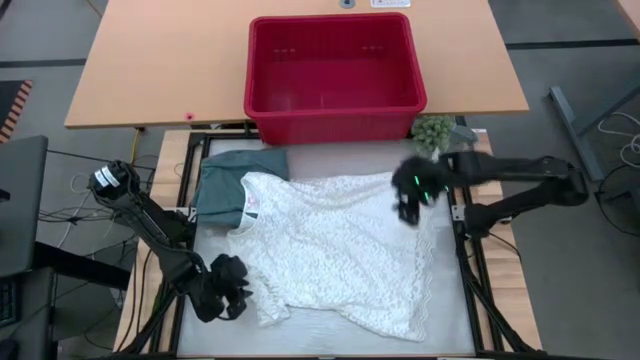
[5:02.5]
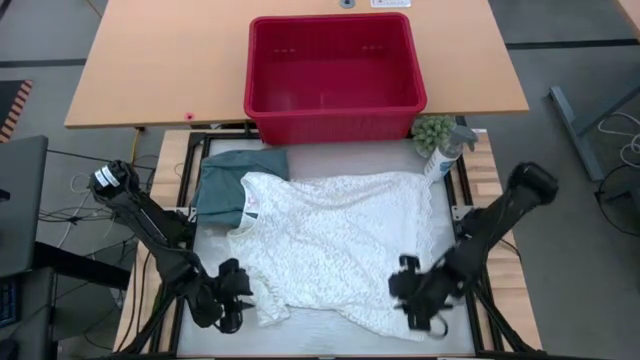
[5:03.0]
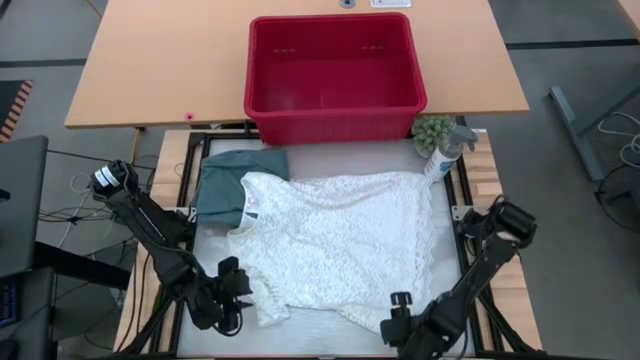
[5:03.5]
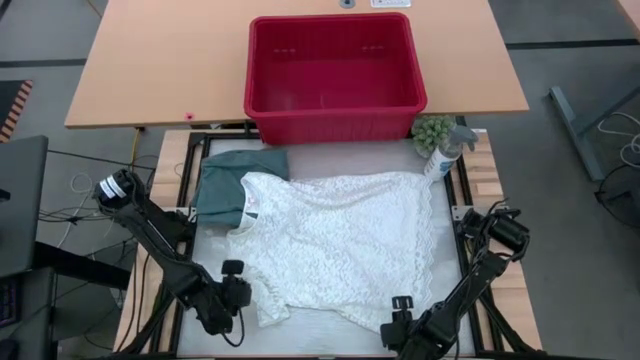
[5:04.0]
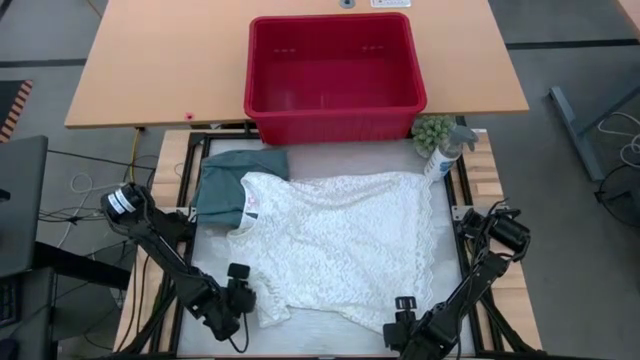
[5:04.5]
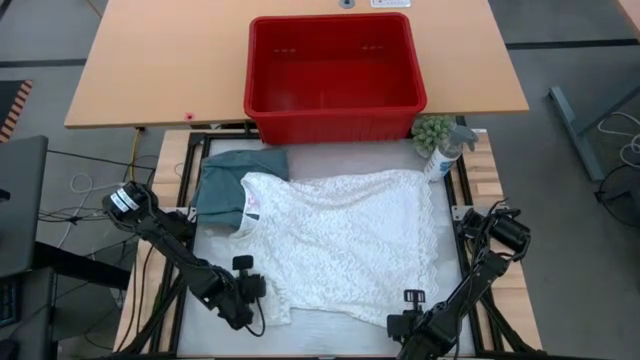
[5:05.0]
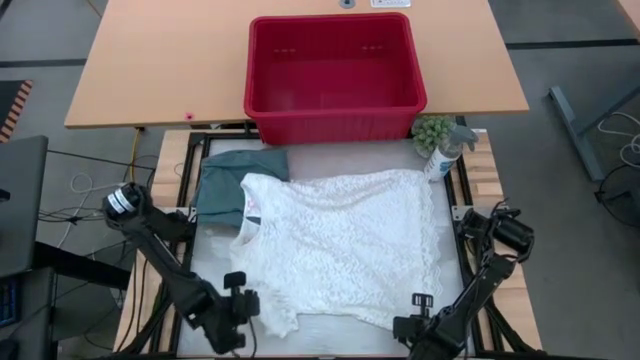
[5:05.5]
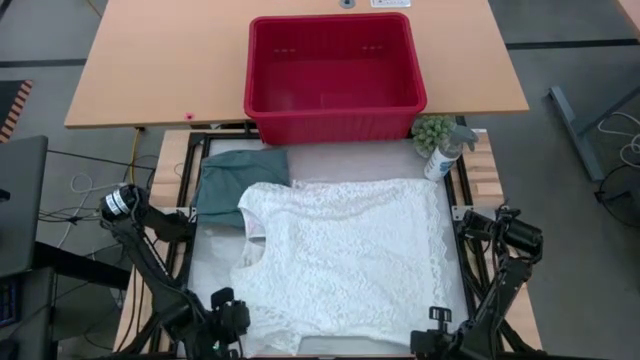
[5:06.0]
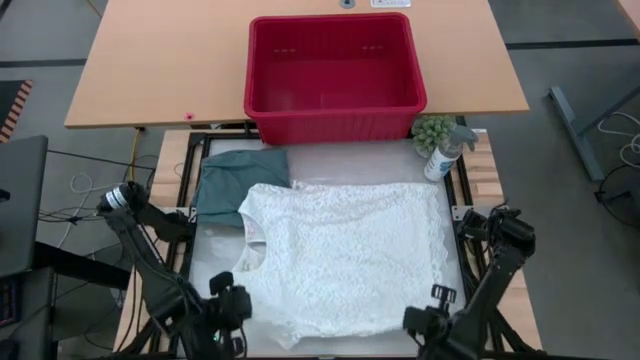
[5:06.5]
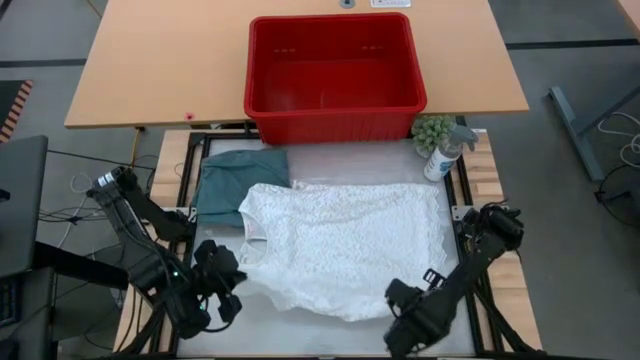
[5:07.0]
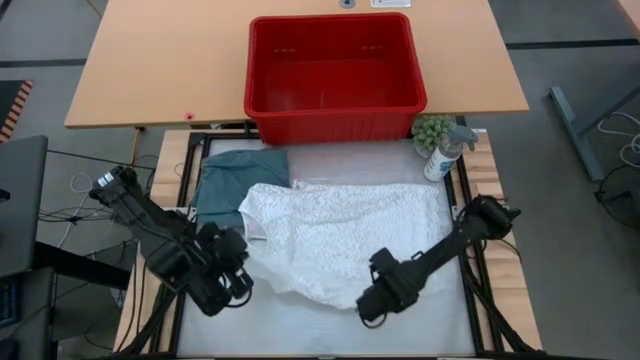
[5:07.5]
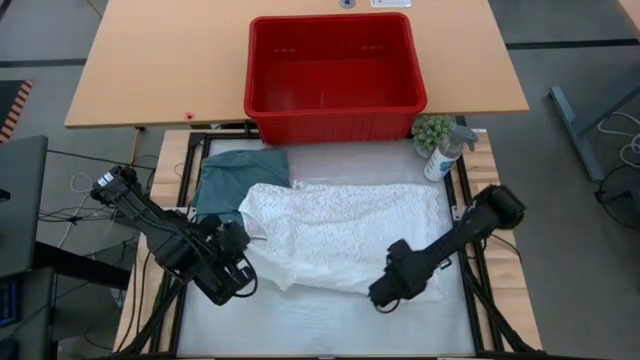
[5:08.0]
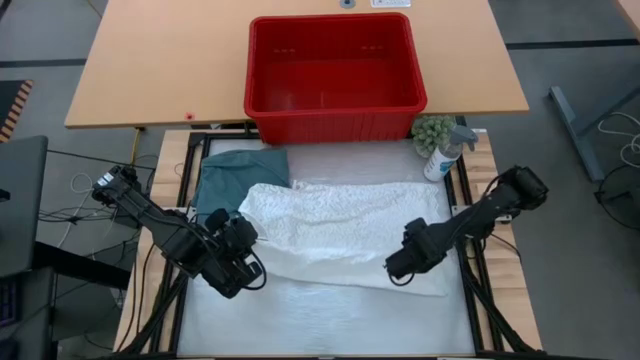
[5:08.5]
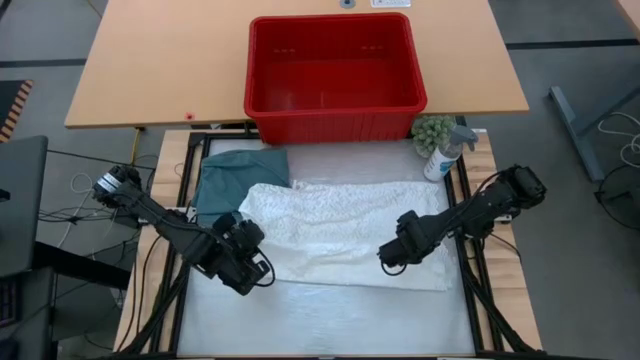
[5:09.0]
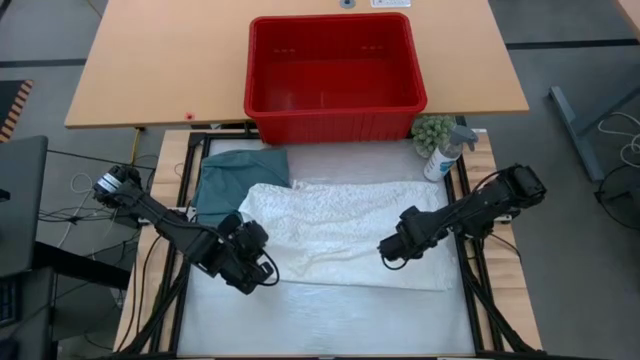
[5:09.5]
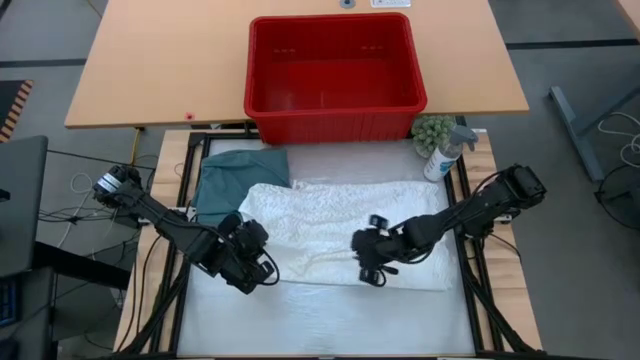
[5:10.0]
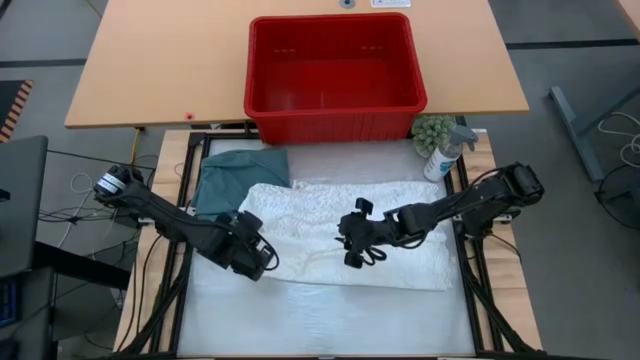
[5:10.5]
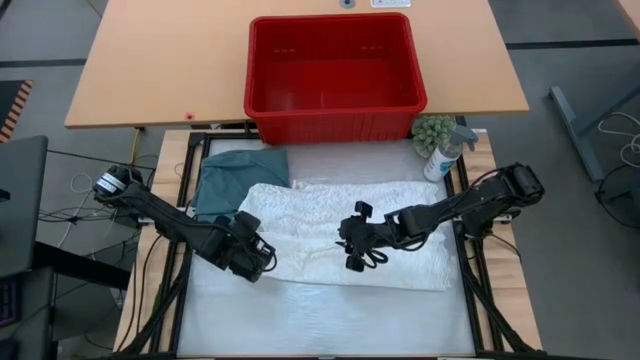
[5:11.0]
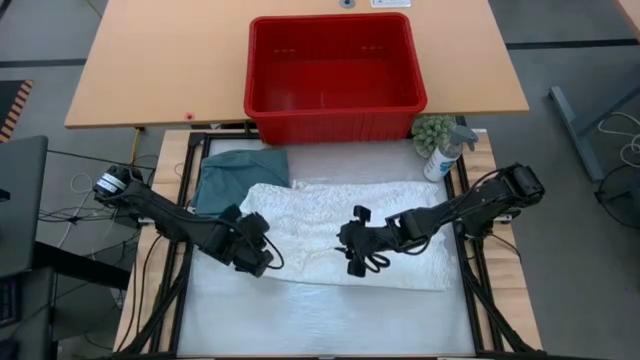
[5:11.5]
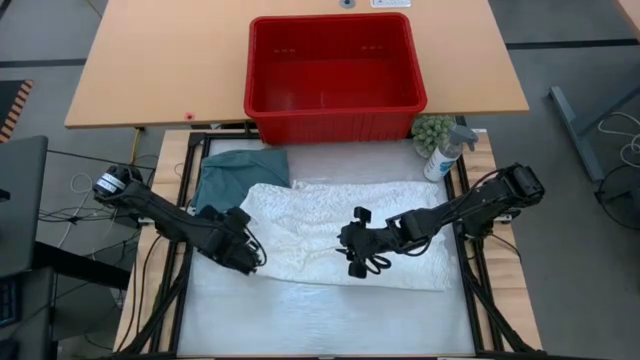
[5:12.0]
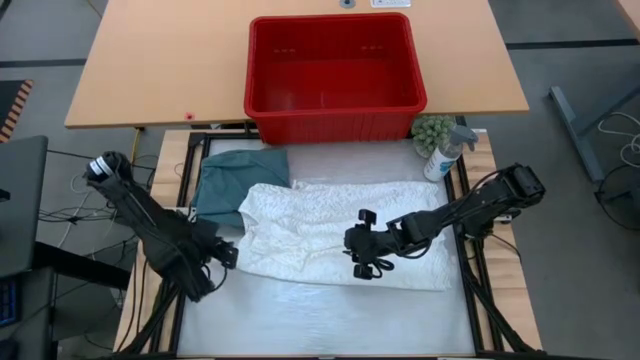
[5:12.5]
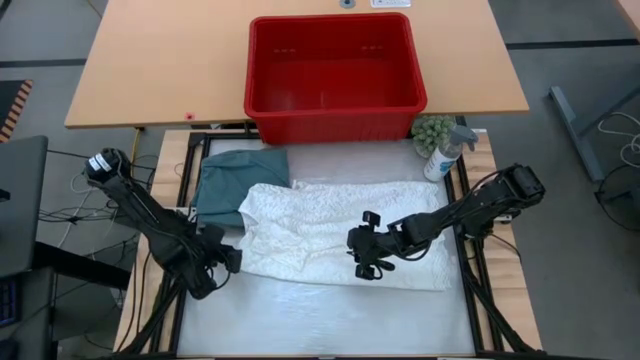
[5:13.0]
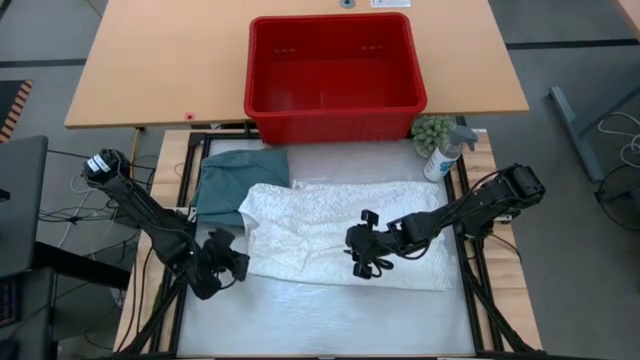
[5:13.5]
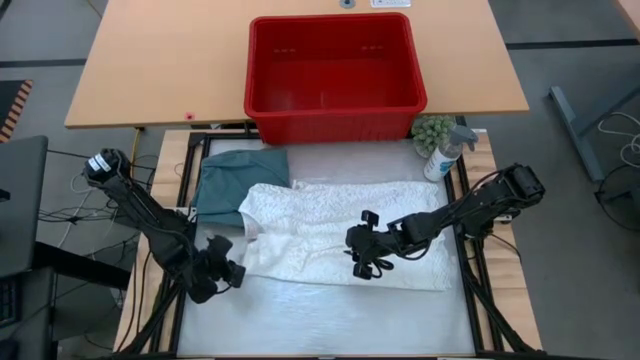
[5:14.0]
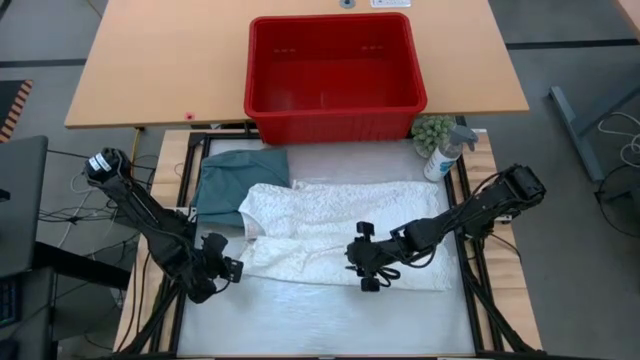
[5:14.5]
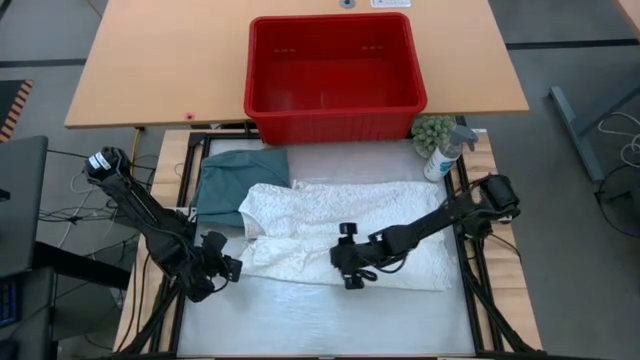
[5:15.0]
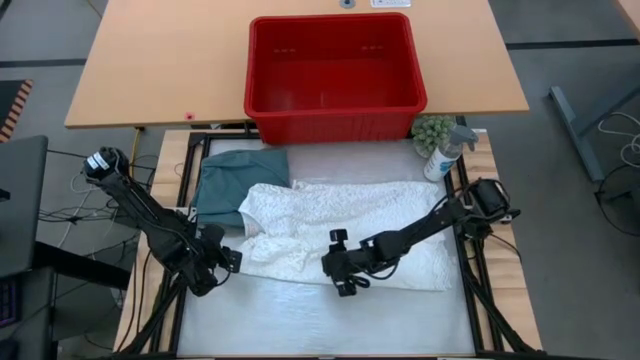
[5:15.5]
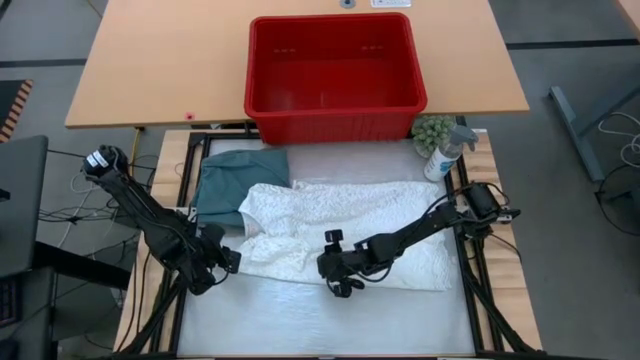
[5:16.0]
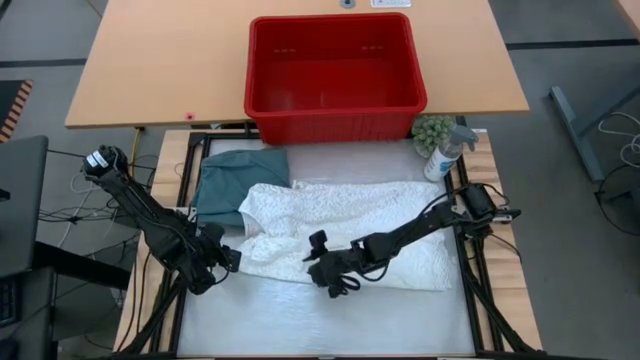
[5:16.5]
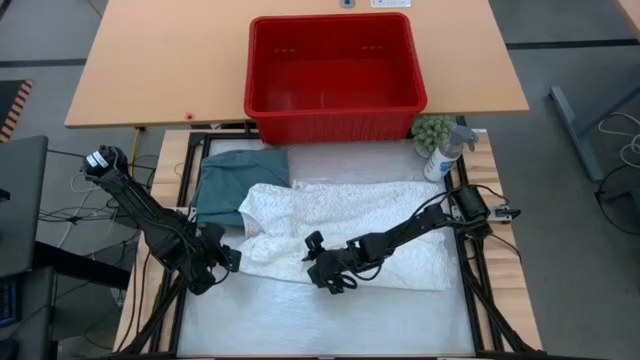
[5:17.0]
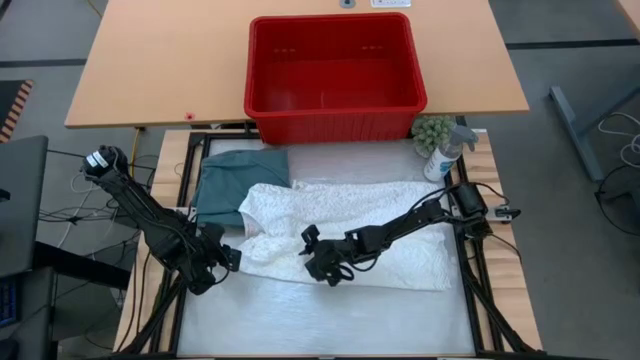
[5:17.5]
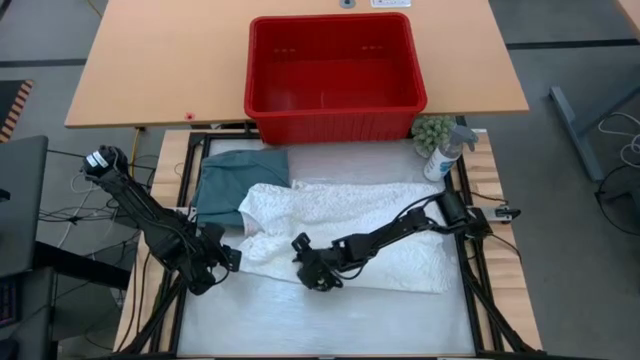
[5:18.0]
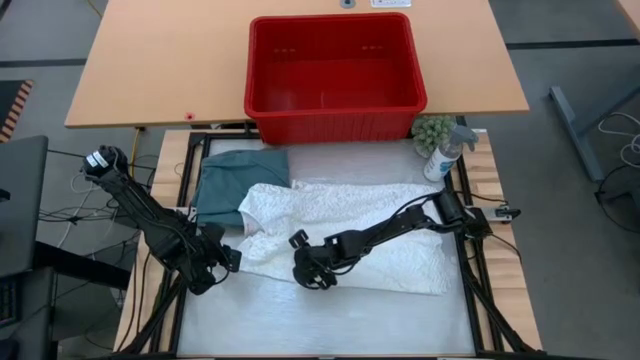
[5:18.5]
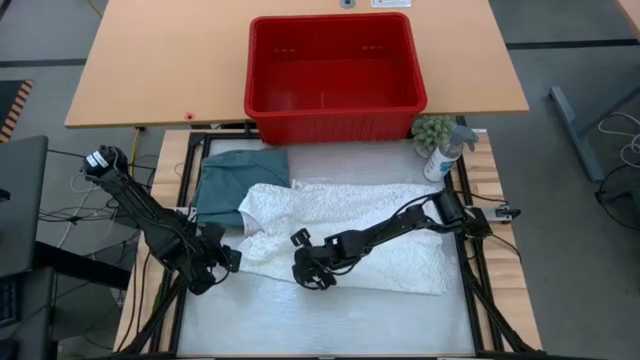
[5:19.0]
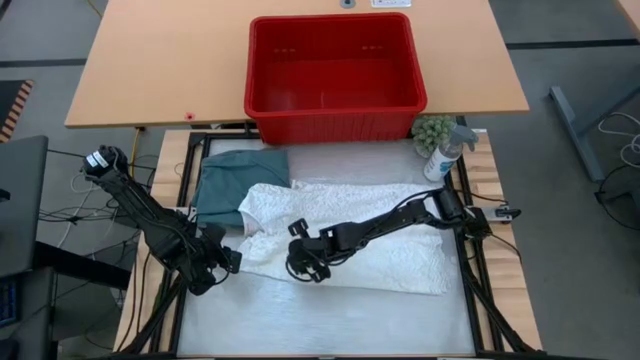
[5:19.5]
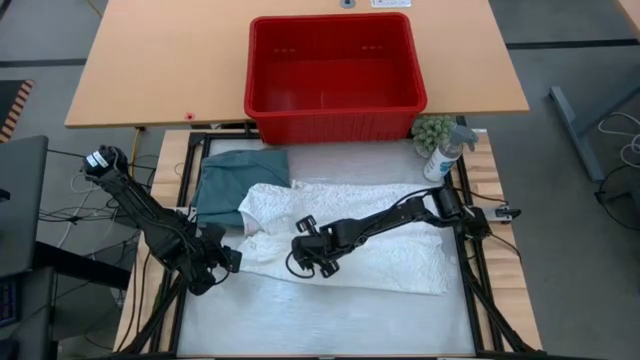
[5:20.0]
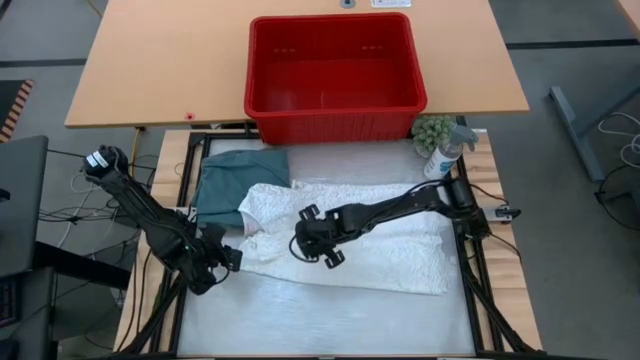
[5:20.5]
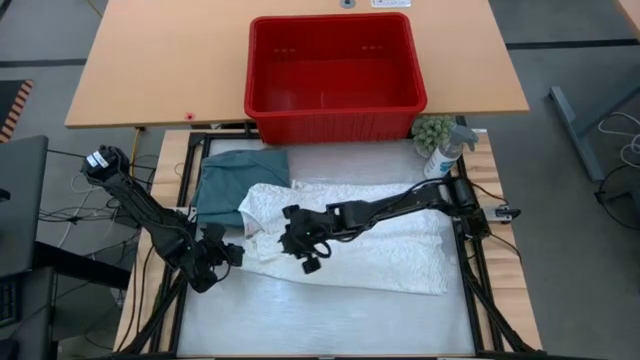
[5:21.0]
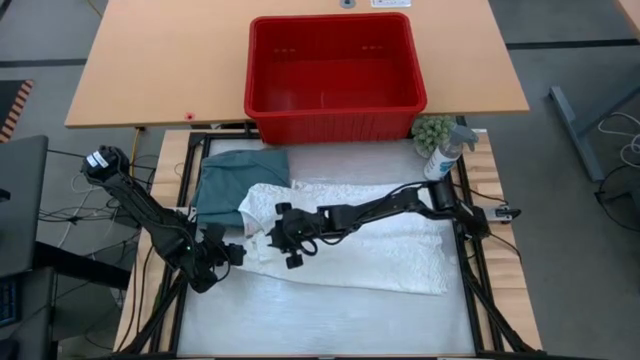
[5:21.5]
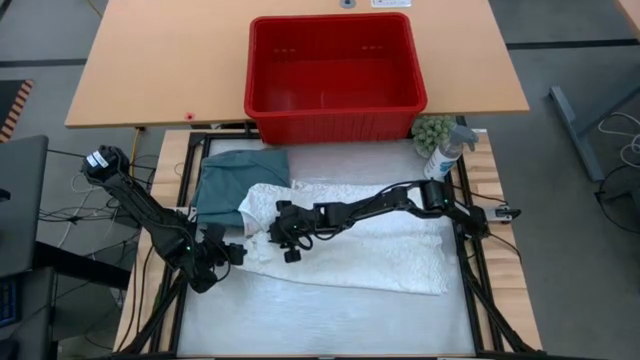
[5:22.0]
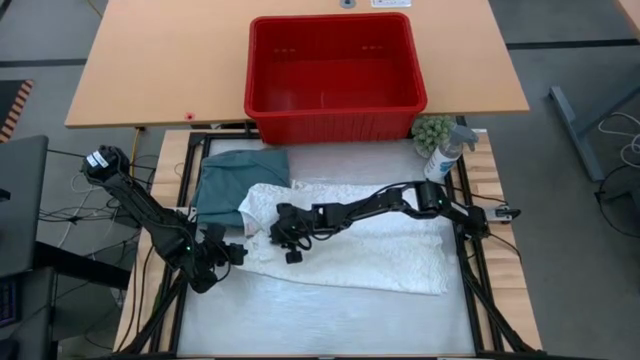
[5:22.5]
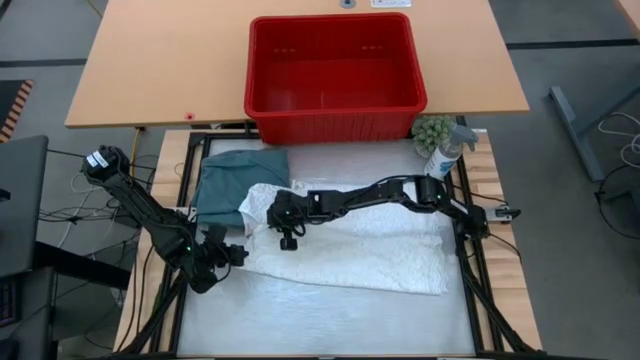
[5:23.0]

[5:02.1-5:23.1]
Task: Fold Laundry from Bin
Fold the white shirt in the red bin

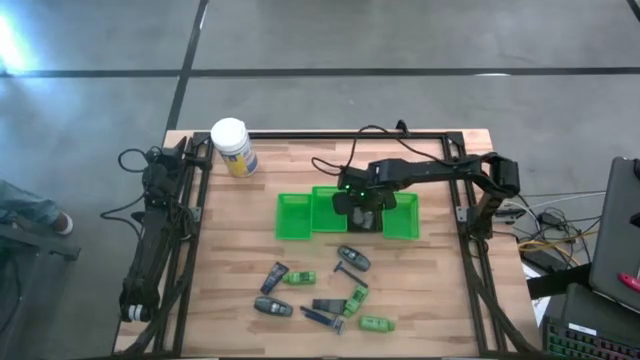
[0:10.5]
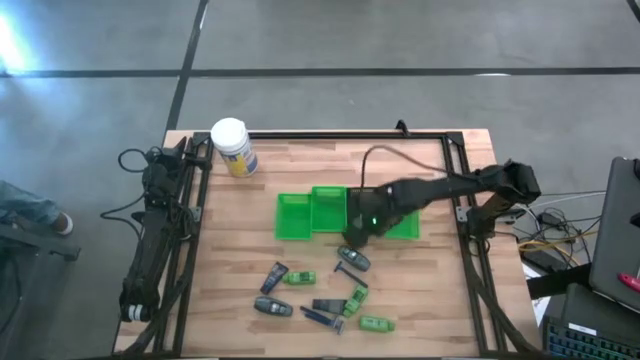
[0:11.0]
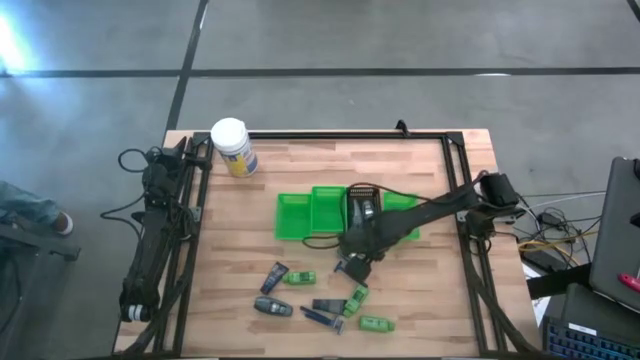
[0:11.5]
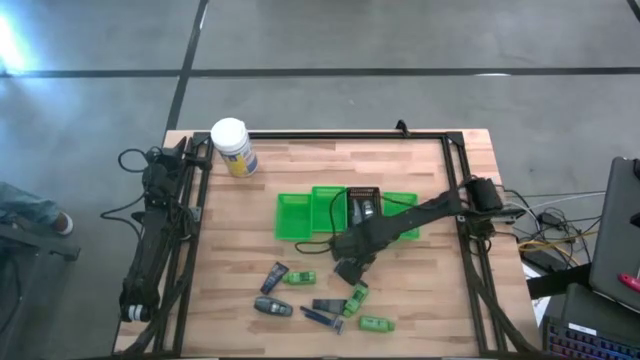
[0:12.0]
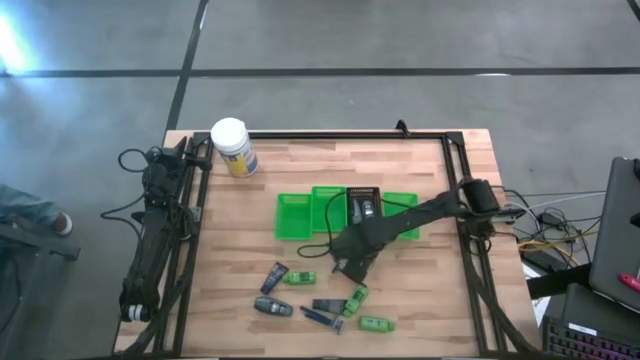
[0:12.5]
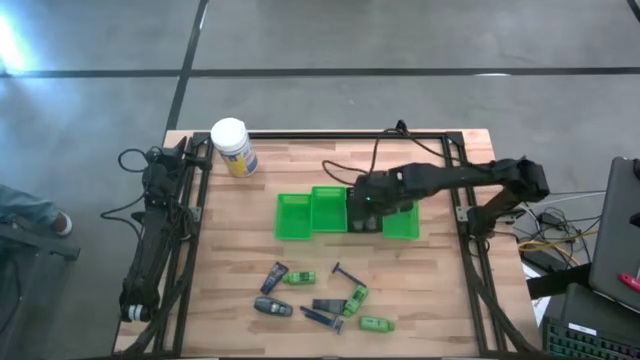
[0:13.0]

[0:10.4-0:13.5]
Task: Pick & Place Travel size toiletries
Put the gray deodorant into the black bin
